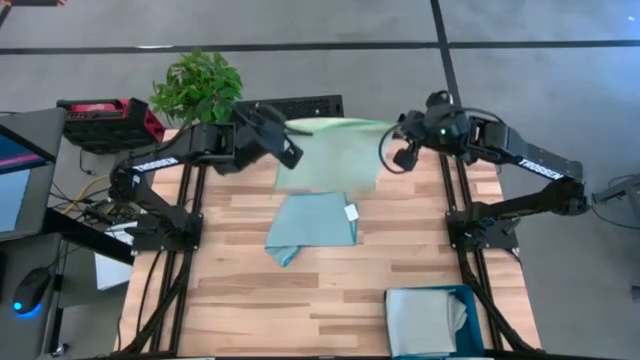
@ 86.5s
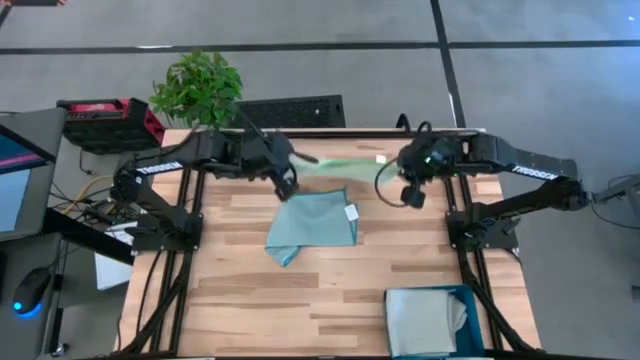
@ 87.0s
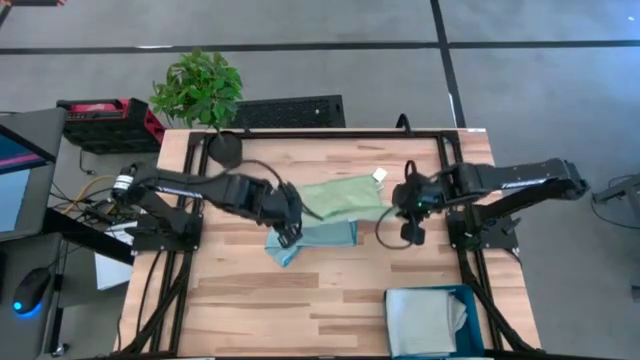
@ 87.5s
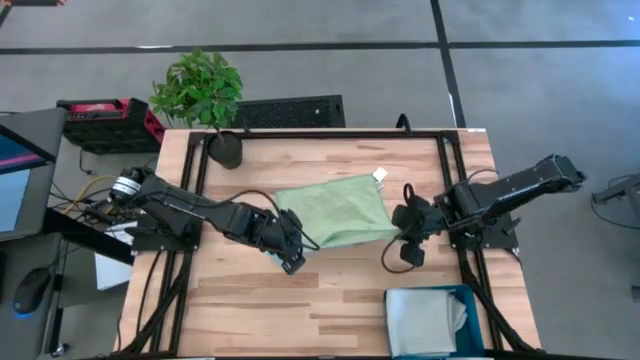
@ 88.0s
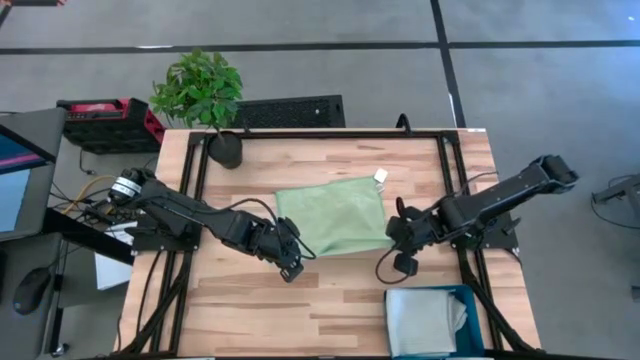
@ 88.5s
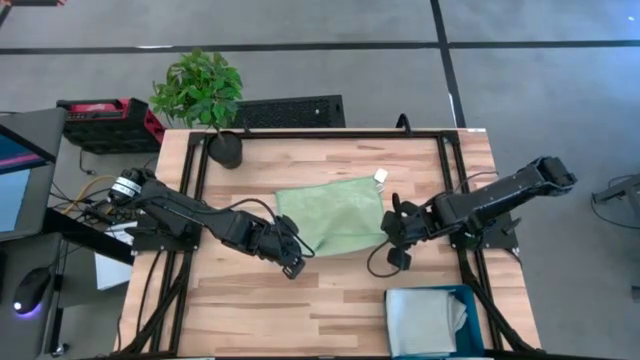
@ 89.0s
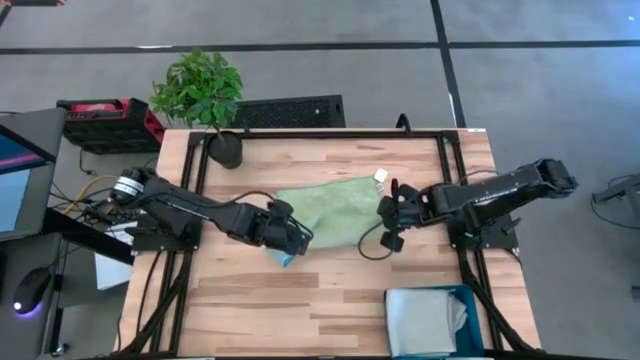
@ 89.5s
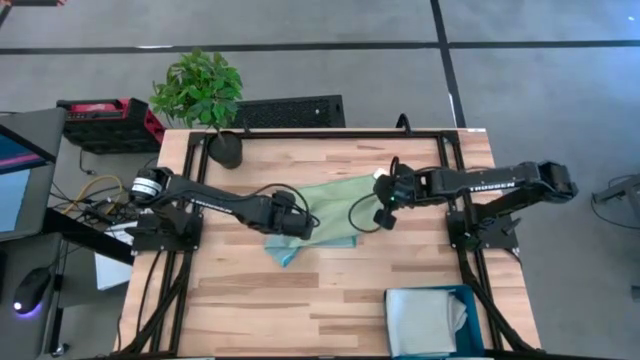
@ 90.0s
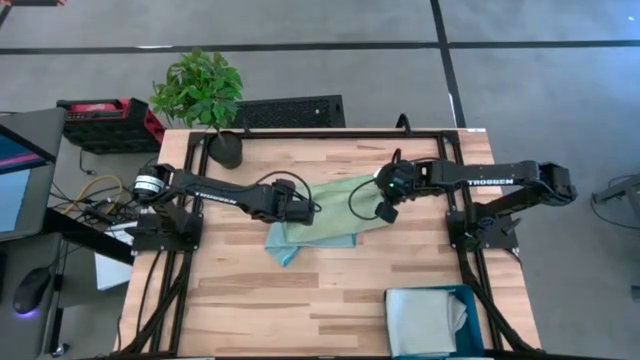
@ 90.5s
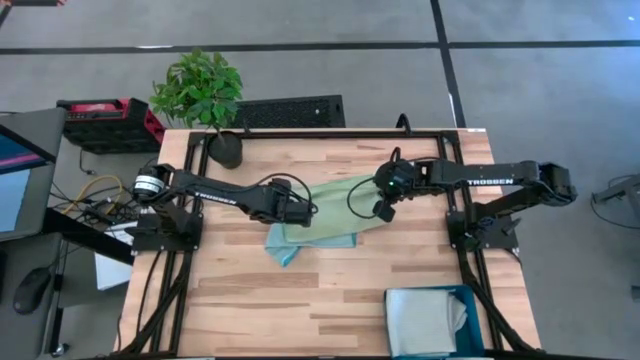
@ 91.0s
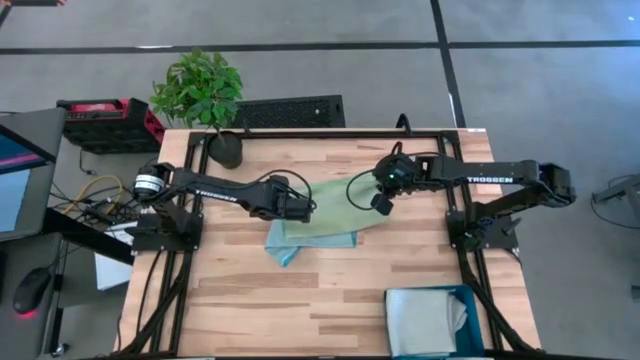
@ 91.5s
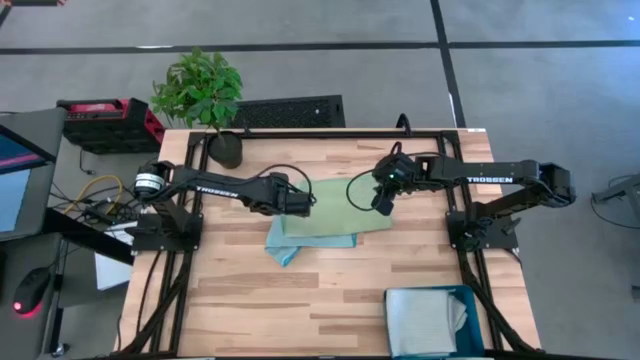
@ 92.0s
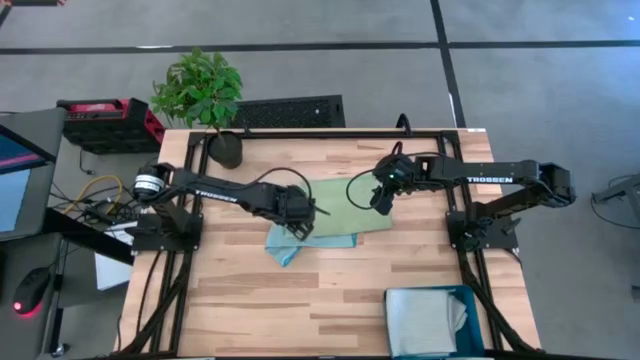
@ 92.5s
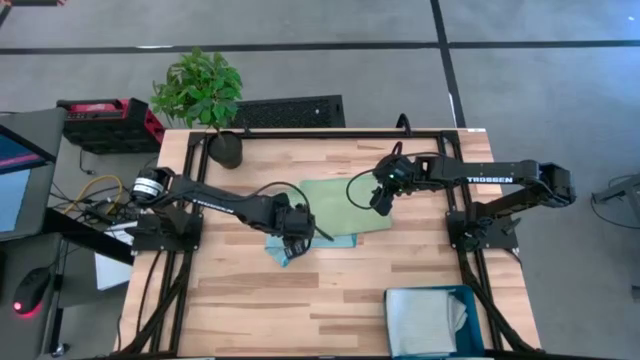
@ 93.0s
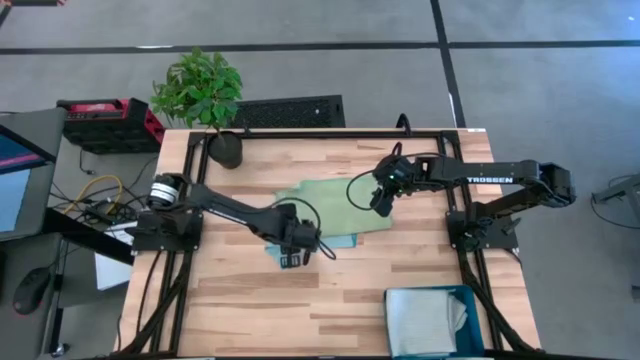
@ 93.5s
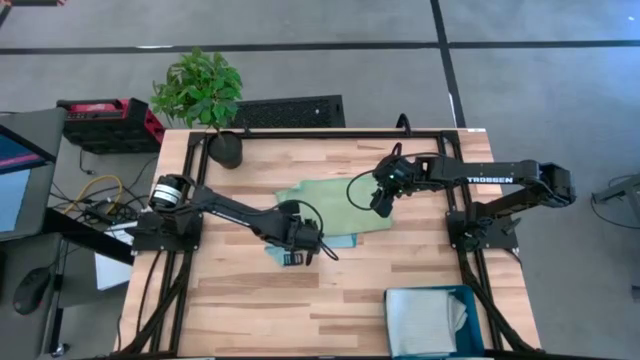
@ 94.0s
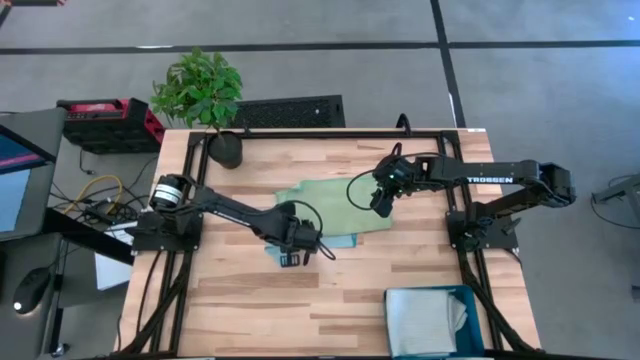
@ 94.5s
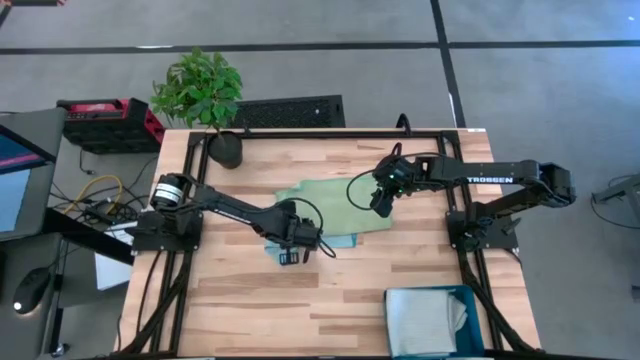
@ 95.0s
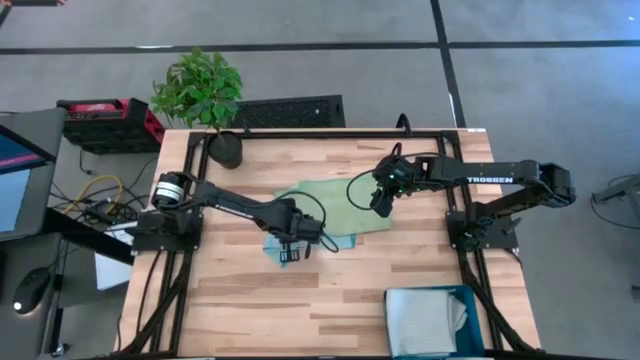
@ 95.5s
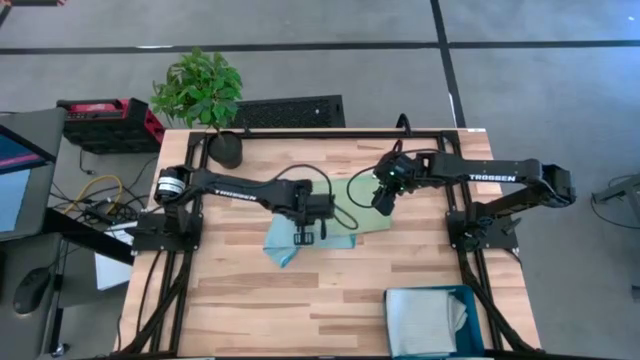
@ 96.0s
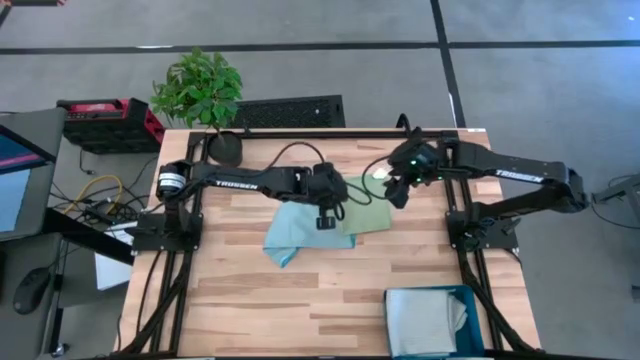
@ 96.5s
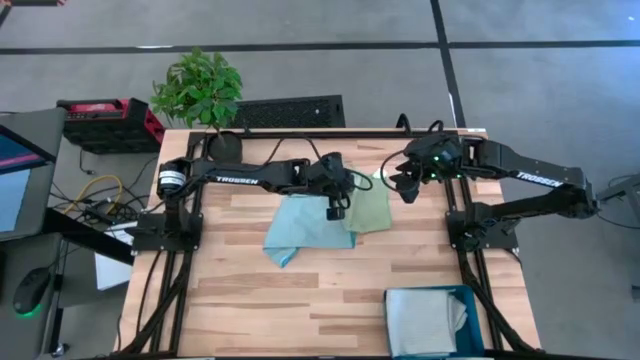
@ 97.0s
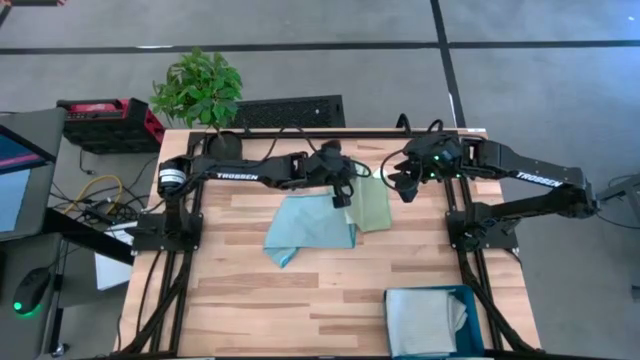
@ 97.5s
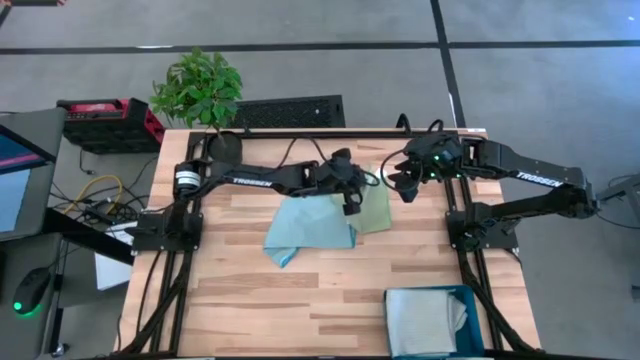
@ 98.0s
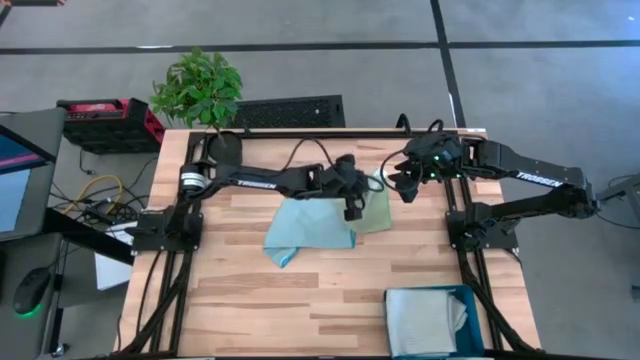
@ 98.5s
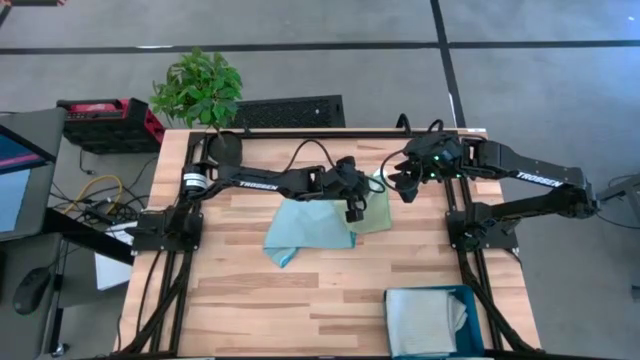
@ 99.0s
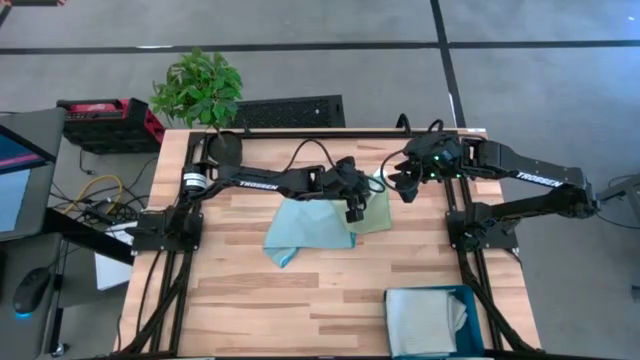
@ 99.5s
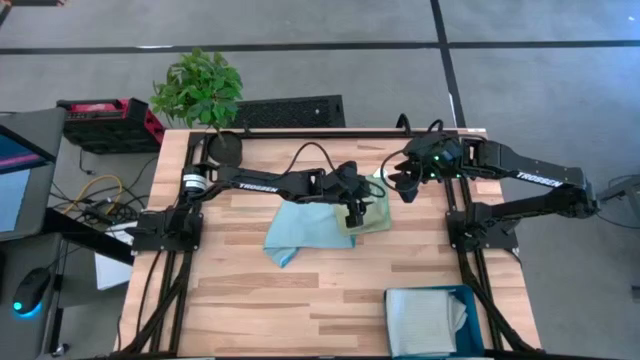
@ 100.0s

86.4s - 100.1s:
Task: Fold microfiber towels
Fold the green microfiber towel

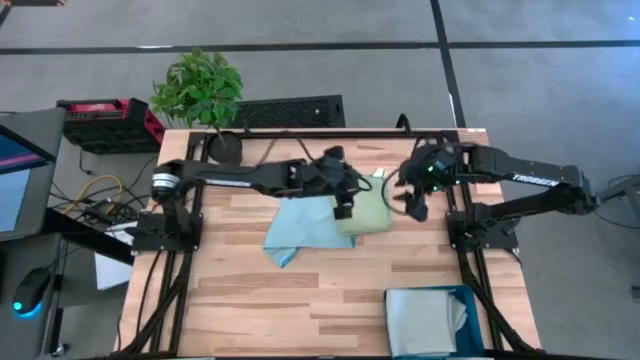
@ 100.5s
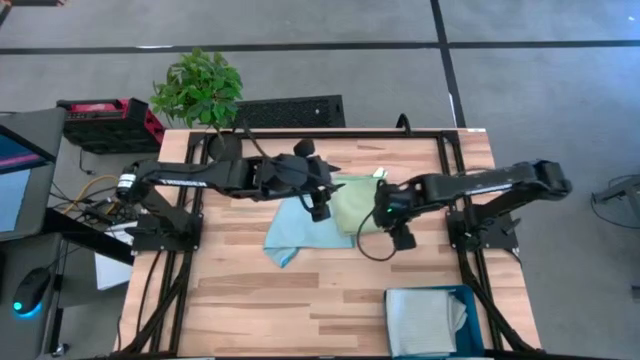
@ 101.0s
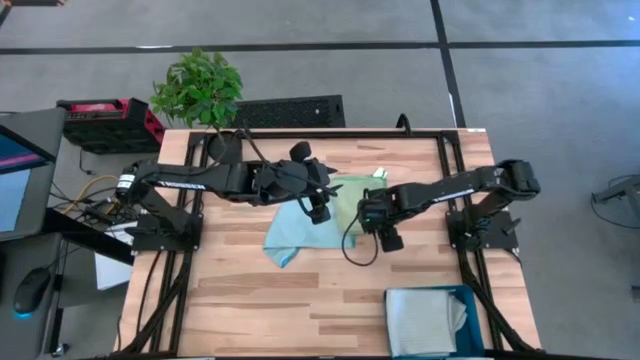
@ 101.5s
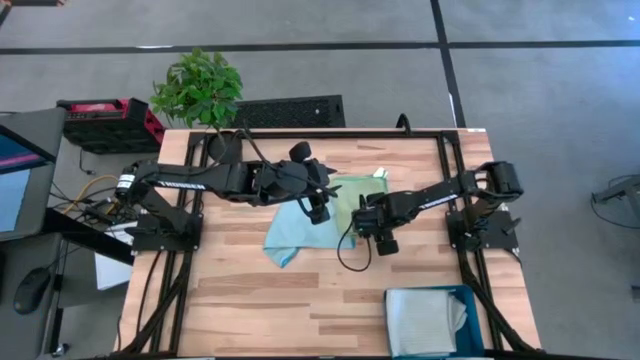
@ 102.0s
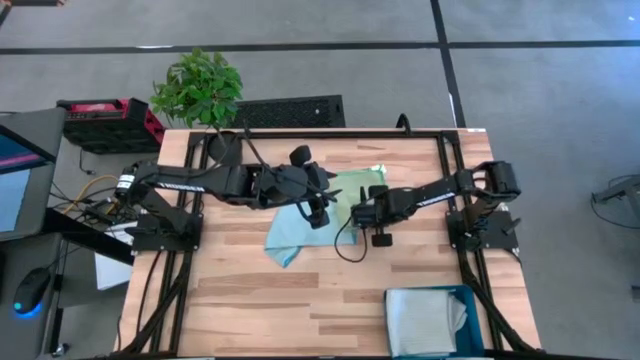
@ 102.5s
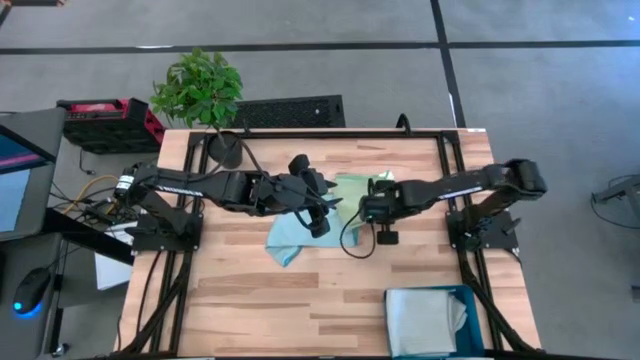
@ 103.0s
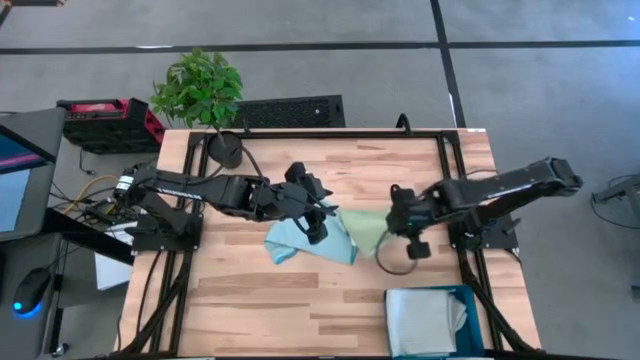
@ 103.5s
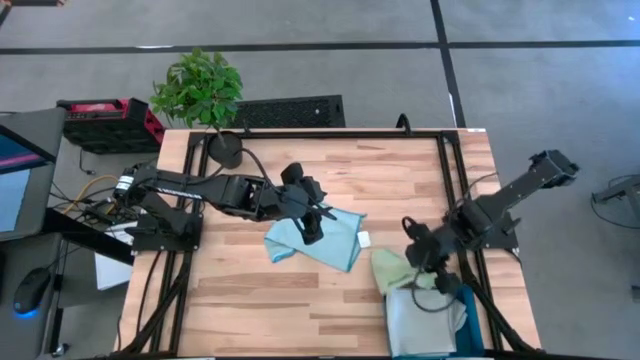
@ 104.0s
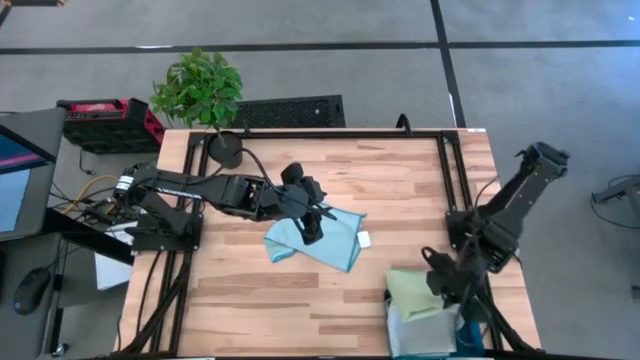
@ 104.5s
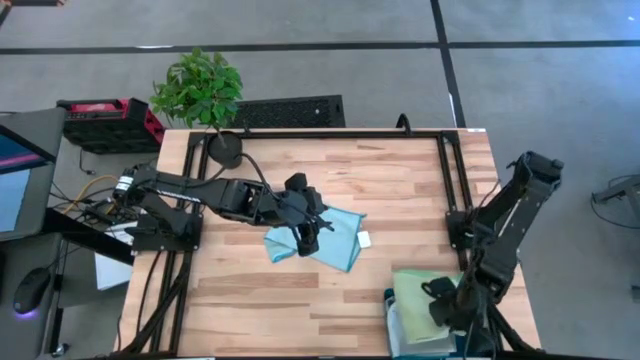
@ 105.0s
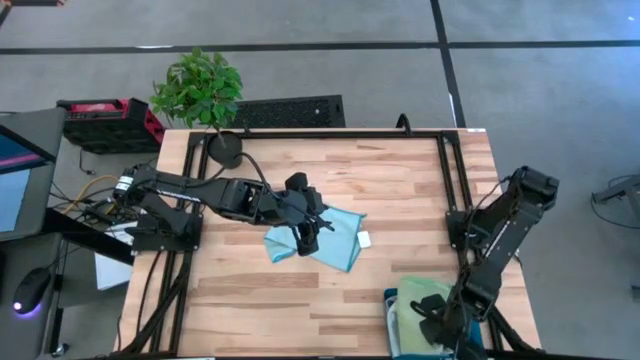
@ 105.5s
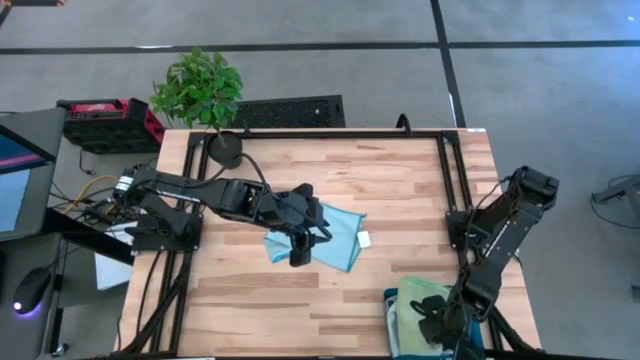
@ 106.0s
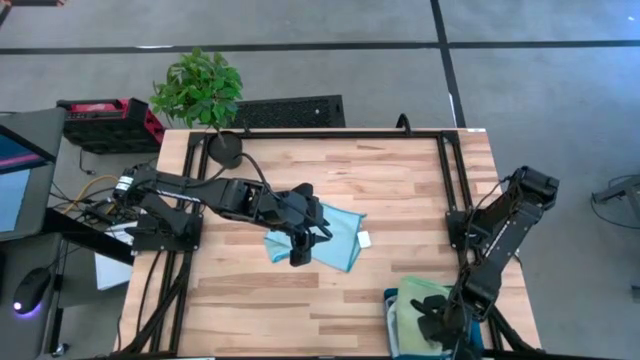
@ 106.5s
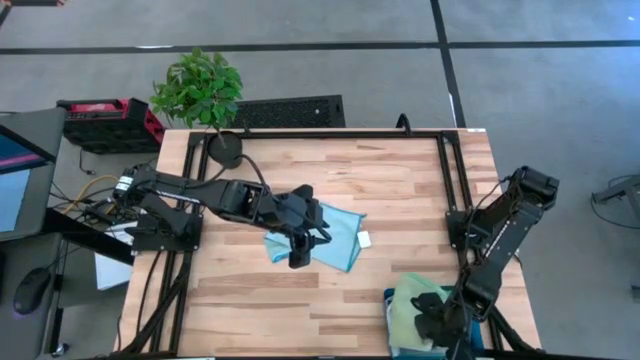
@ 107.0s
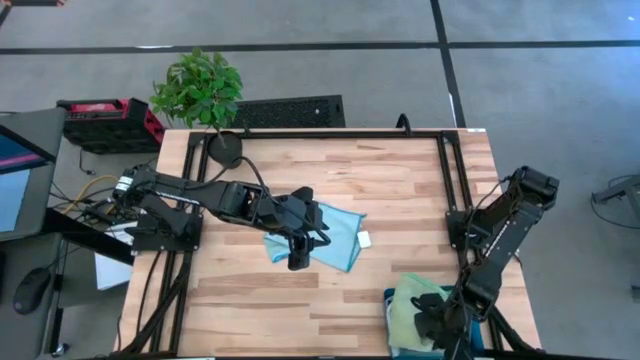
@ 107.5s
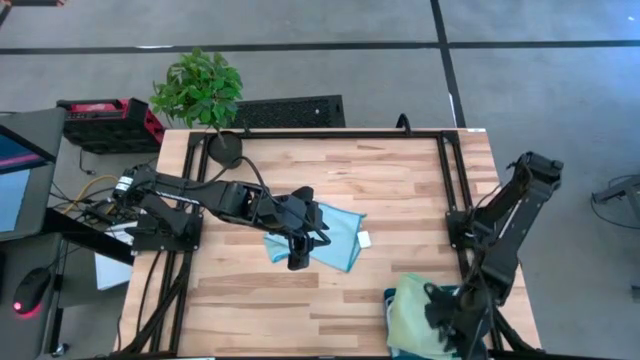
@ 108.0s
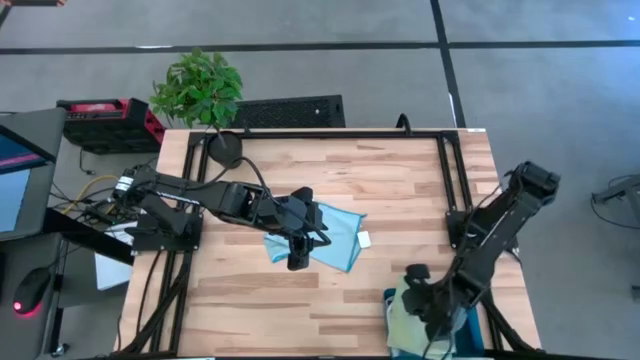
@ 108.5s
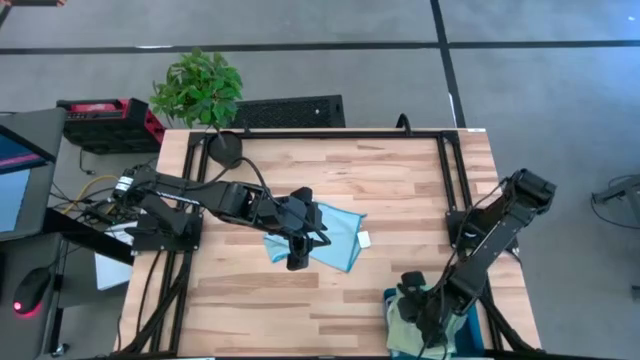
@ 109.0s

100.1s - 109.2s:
Put the folded green microfiber towel into the blue bin
